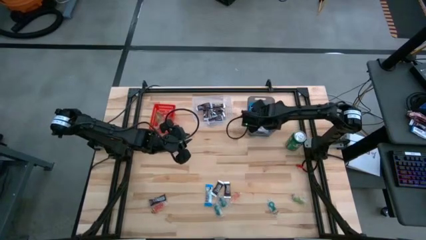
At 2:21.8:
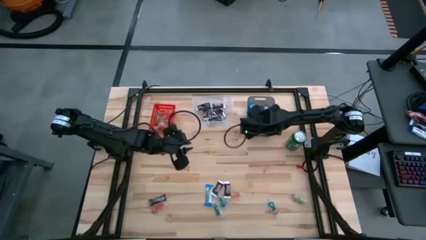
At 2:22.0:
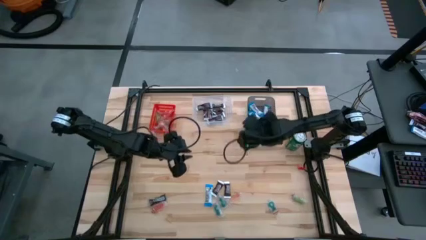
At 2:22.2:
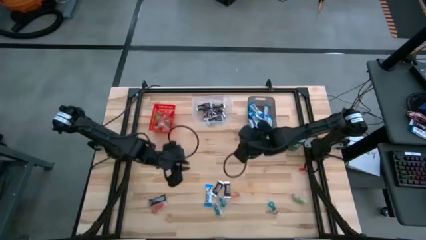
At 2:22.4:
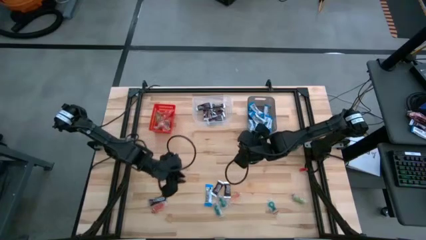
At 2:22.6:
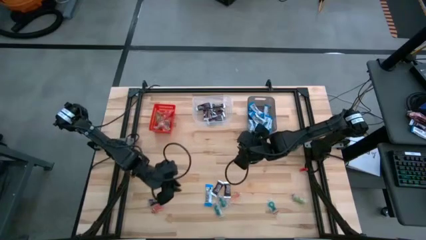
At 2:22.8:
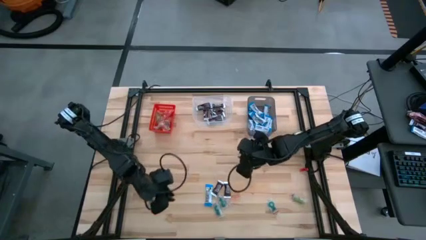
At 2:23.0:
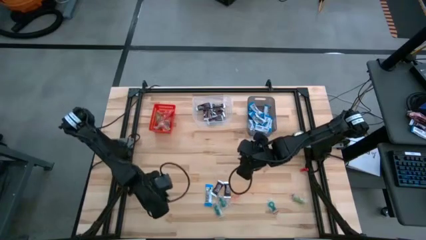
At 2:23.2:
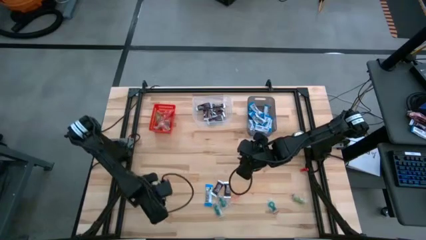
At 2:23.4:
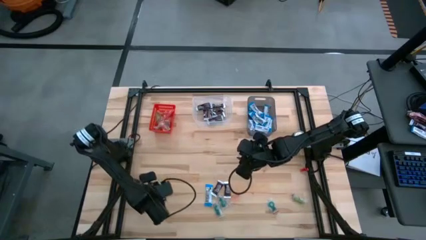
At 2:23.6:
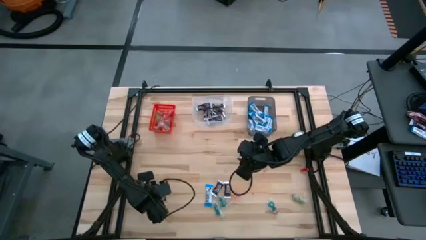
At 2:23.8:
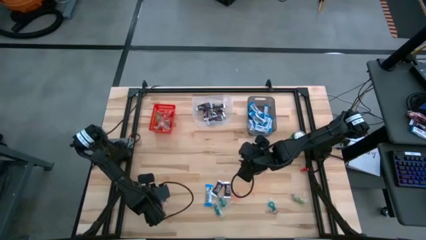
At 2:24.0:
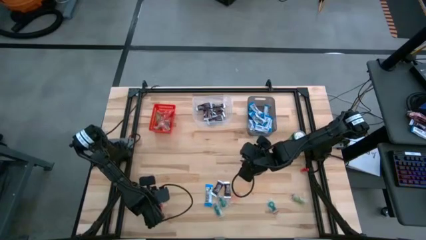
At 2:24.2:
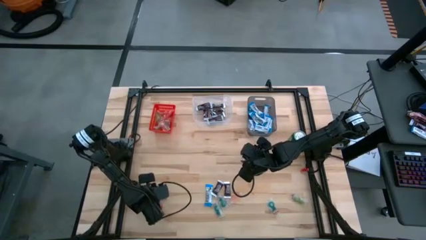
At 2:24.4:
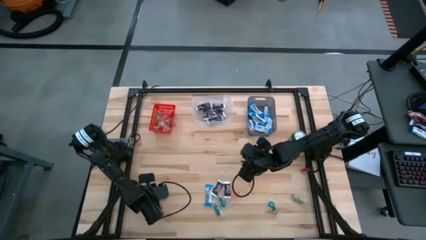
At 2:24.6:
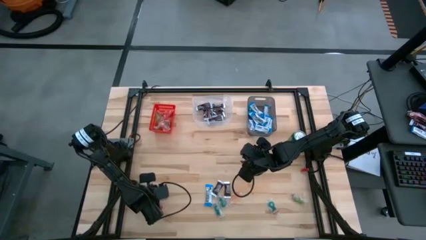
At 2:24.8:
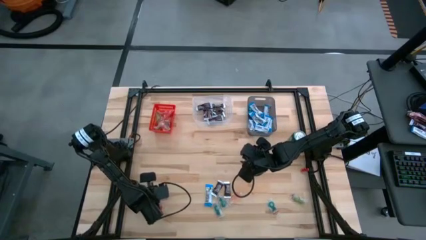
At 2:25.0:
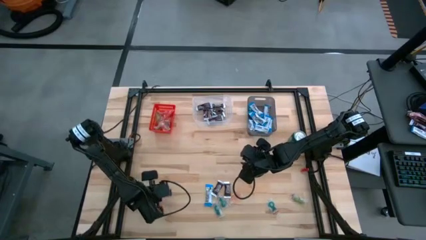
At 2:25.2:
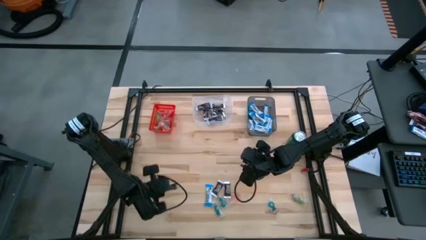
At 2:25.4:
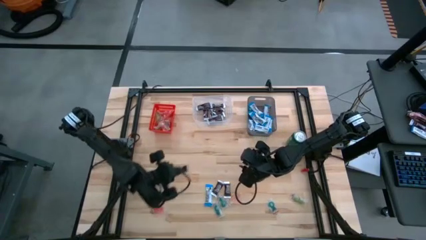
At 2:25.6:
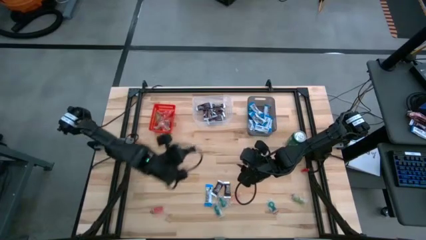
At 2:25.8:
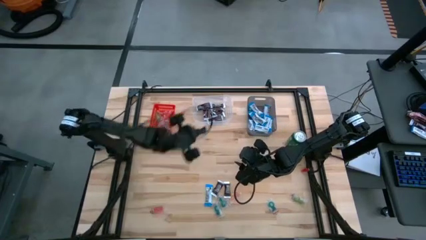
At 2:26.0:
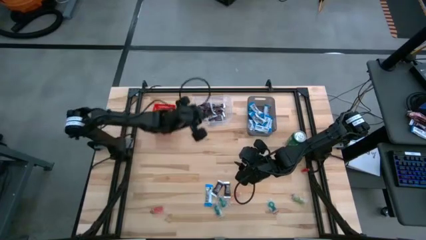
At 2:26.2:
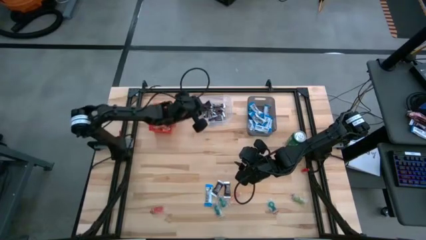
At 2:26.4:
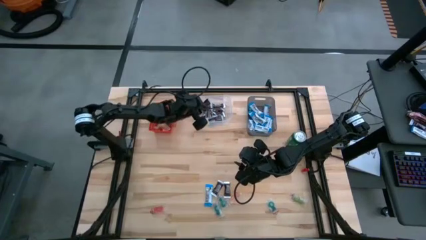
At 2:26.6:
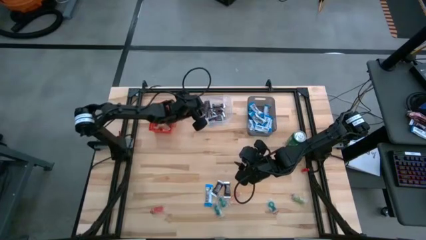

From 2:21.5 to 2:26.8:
Task: Sort candy
Put the black chocolate bar into the transparent bin

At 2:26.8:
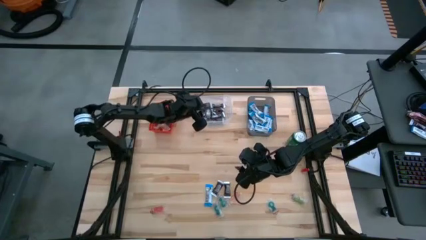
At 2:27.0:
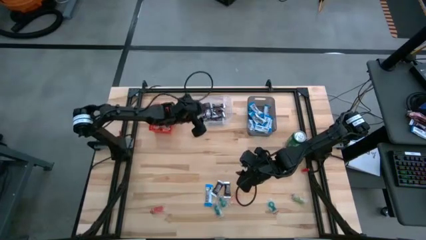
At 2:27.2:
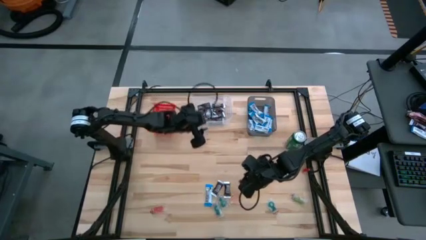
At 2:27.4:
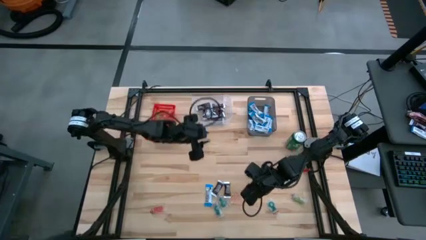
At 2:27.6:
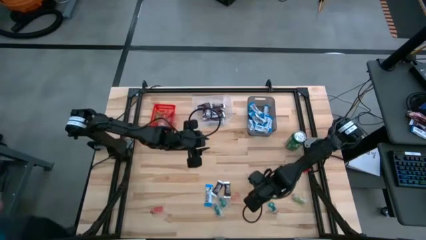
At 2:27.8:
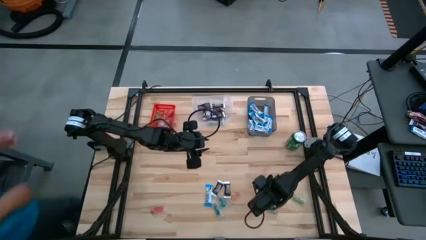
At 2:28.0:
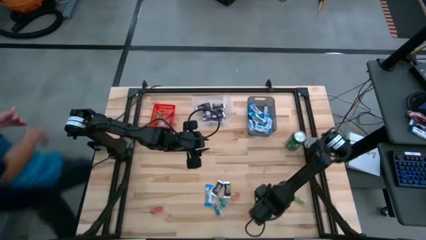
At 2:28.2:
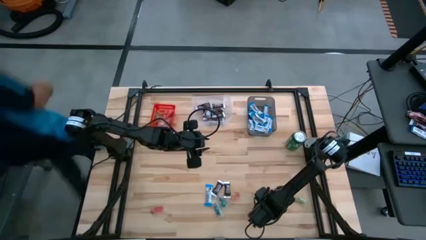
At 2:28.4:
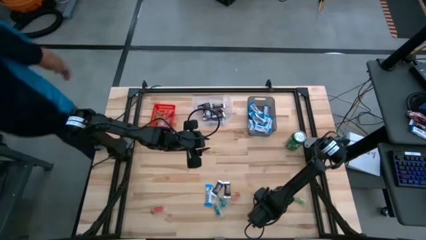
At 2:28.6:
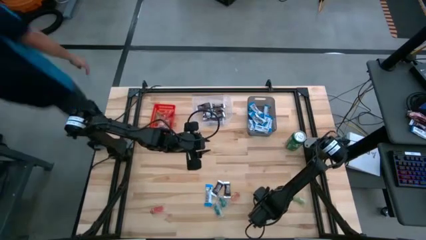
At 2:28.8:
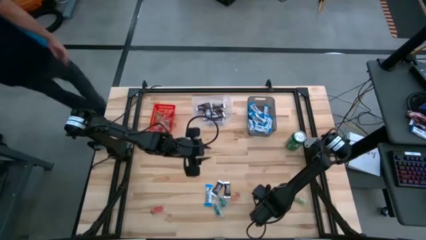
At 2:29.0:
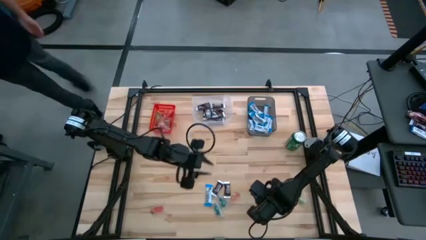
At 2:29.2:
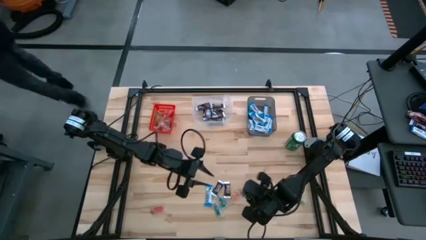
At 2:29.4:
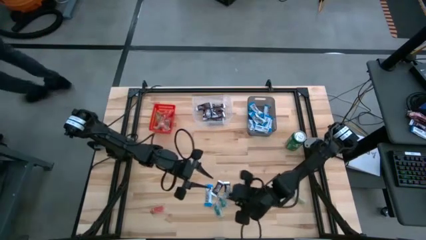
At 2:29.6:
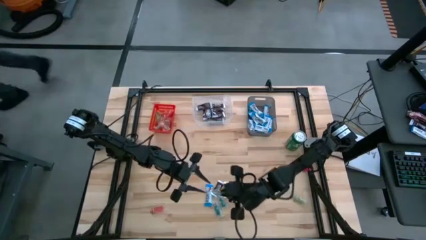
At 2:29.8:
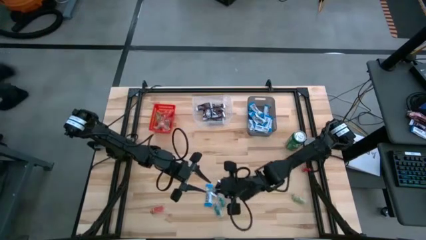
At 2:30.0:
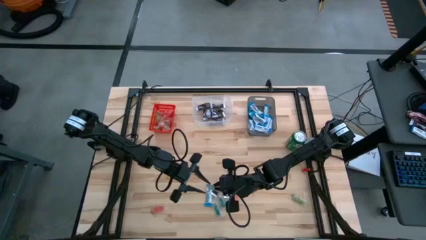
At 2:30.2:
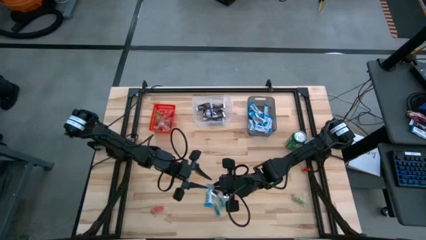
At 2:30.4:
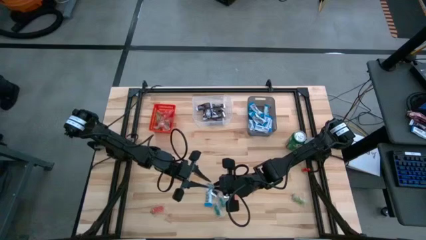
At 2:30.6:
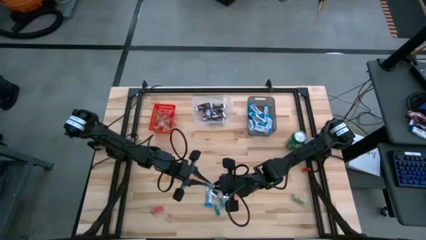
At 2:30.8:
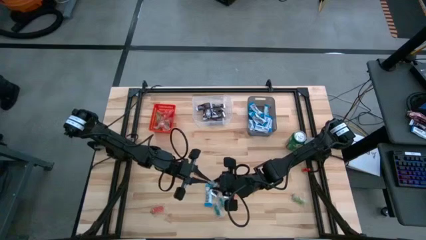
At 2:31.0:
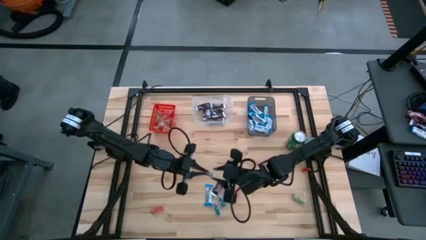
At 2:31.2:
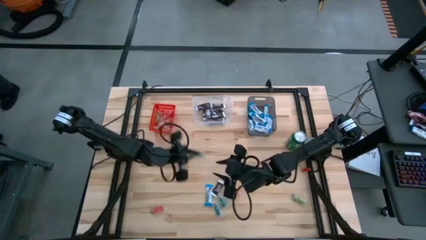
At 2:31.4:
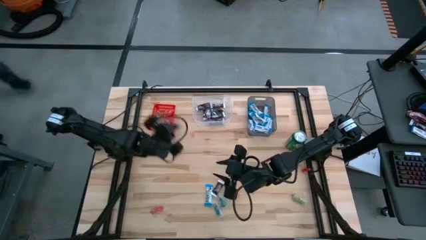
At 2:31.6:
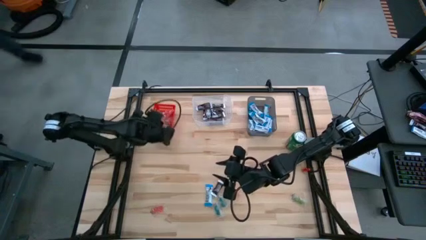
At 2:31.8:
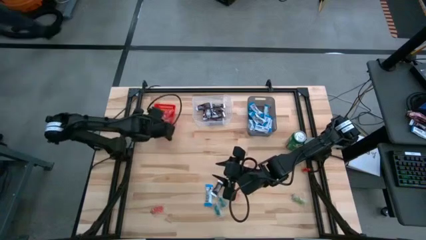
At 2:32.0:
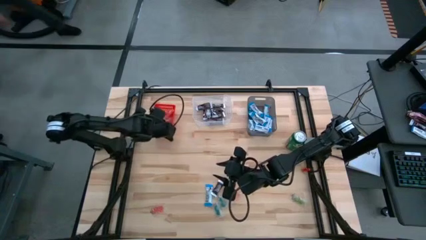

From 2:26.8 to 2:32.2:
Put the blue candy into the red bin

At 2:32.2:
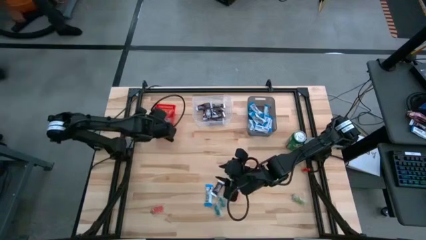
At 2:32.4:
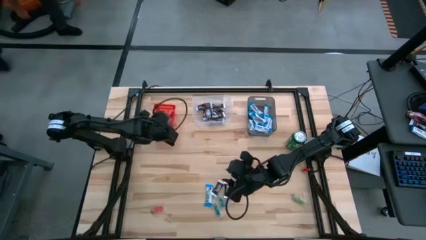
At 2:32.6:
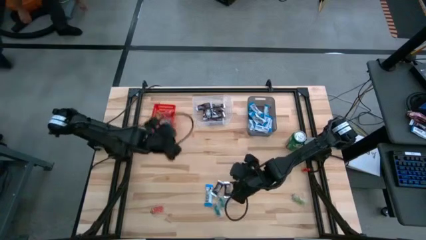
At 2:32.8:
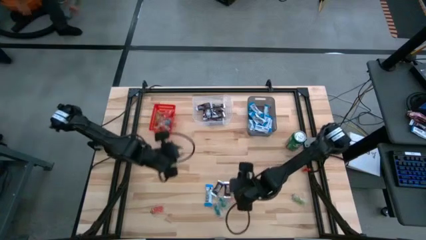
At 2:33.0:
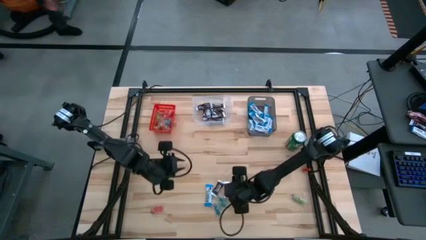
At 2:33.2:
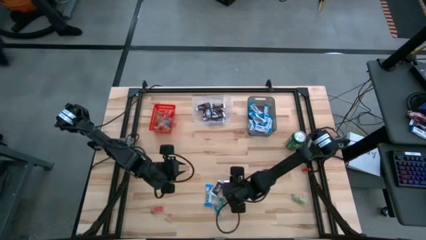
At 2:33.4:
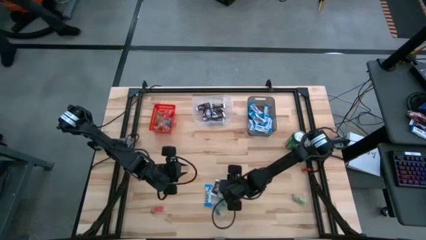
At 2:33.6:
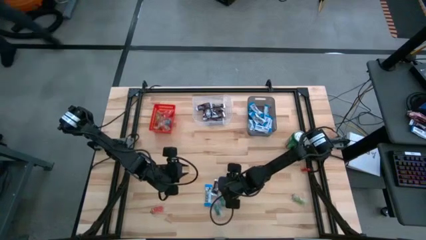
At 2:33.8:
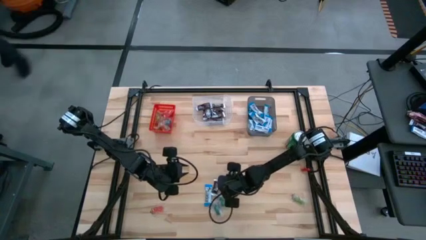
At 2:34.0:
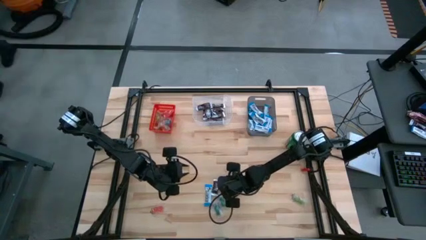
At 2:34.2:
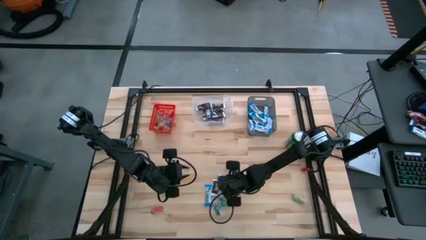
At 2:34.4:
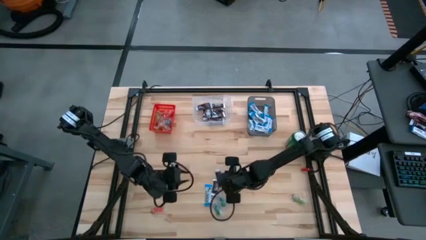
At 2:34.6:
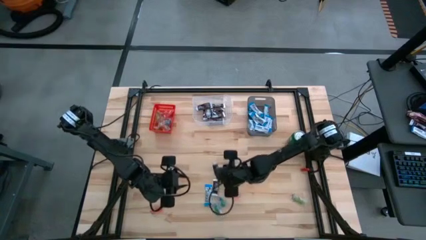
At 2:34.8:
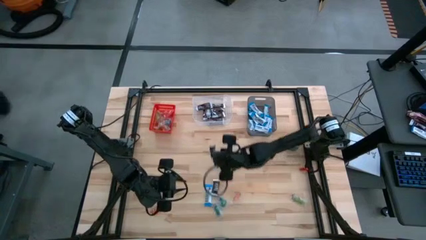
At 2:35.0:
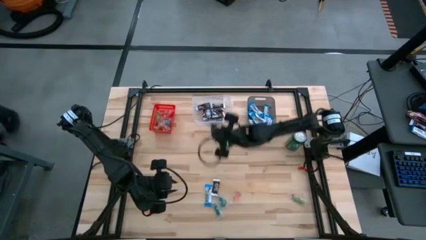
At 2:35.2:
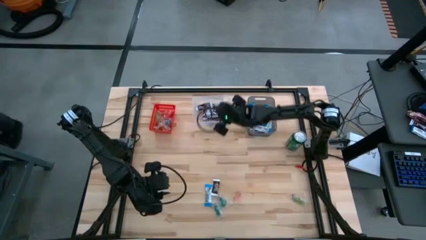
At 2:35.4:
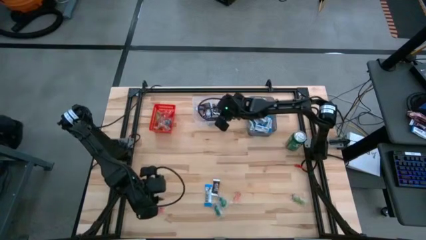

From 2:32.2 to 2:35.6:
Put the black chocolate bar into the transparent bin

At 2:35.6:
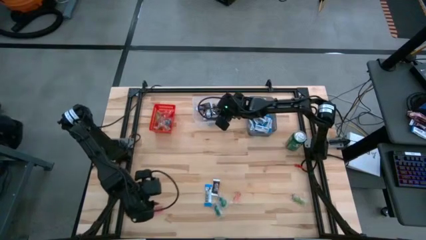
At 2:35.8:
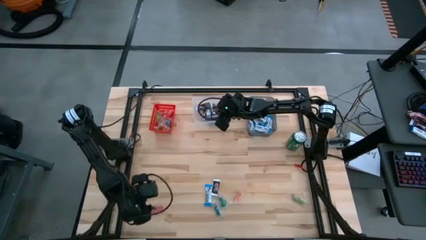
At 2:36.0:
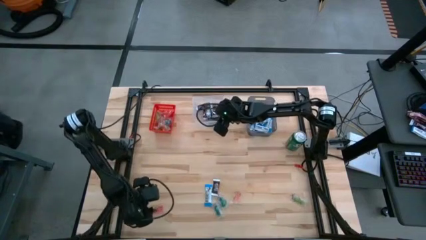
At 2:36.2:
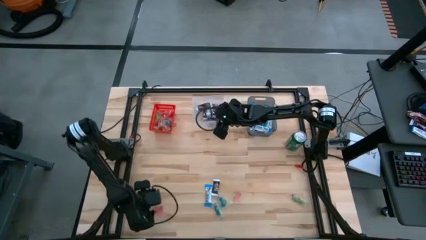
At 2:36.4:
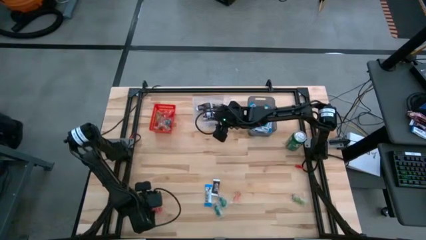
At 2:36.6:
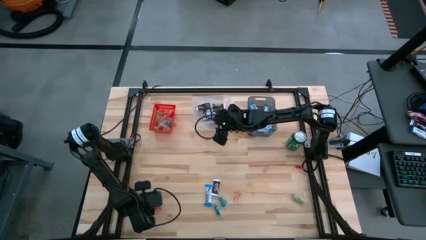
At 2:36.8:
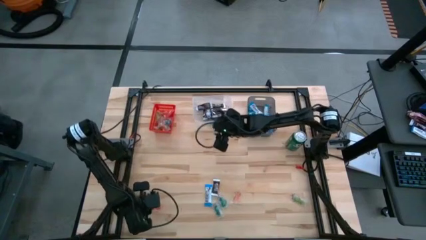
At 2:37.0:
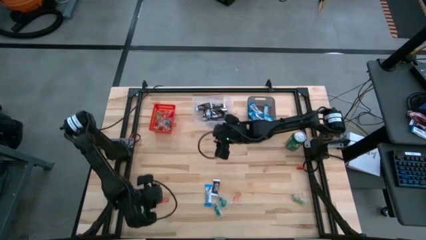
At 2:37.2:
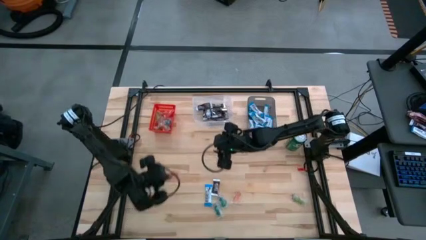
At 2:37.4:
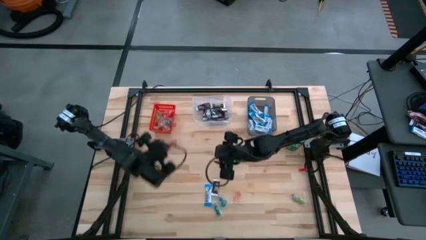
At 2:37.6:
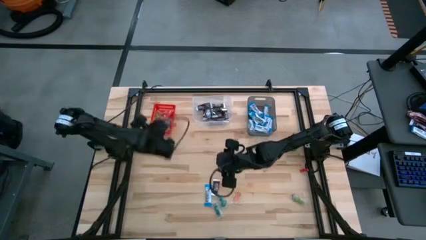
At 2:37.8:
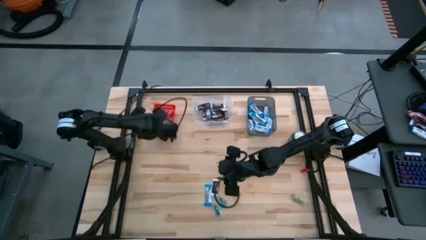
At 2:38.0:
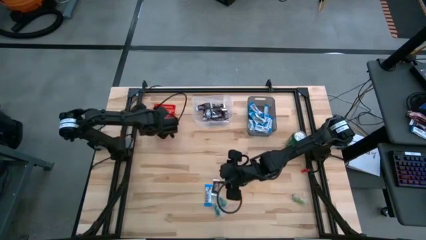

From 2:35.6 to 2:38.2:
Put the red candy into the red bin

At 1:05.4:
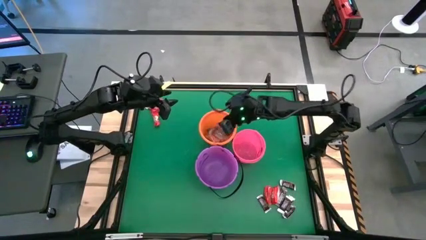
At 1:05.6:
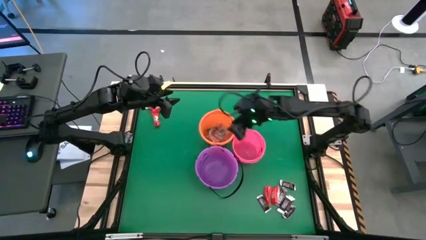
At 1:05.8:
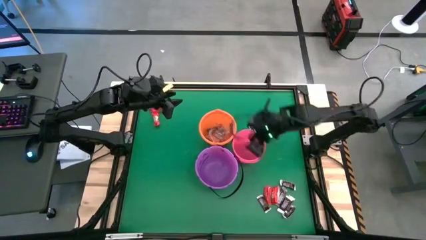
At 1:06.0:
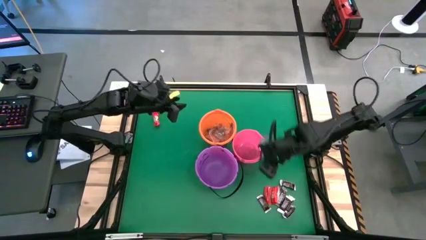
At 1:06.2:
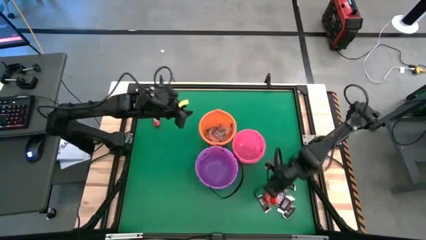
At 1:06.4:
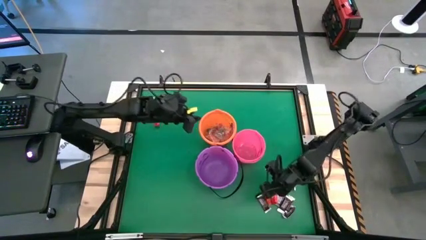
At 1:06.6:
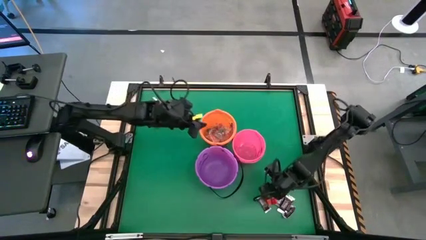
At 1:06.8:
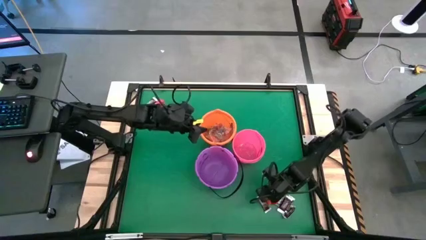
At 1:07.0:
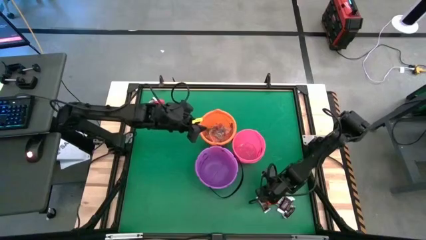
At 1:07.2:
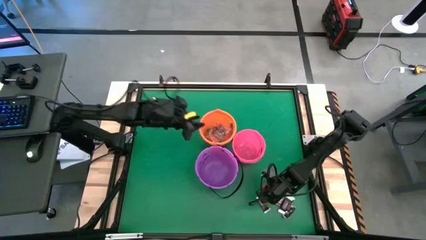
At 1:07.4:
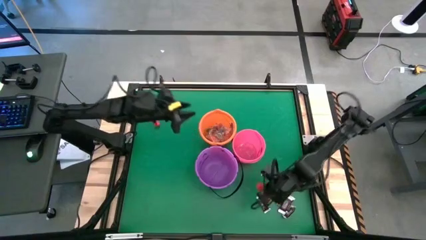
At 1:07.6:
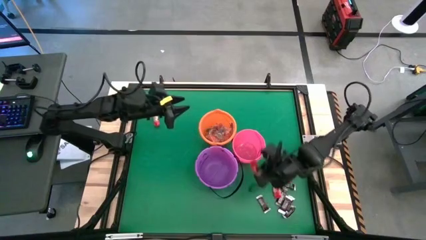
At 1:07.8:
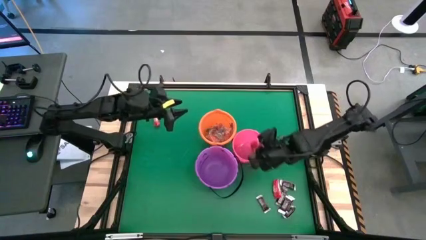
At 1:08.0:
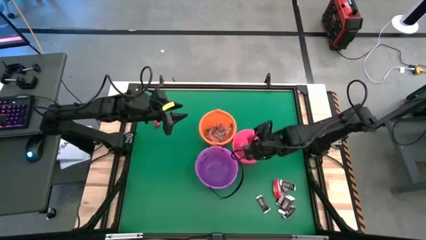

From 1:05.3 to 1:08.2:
Task: Sort candy by brand, put in halloween buckets
Put the red chocolate bar into the pink bucket
